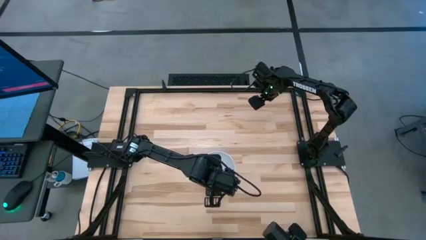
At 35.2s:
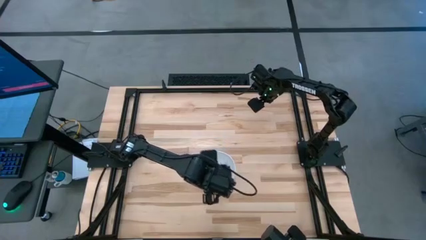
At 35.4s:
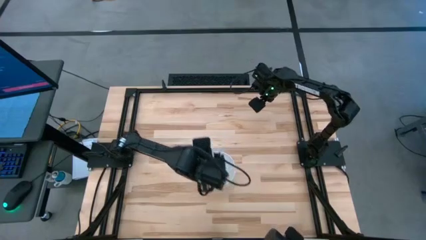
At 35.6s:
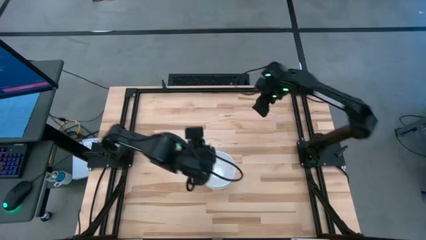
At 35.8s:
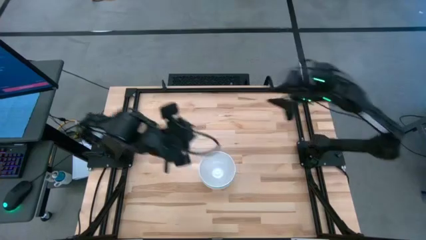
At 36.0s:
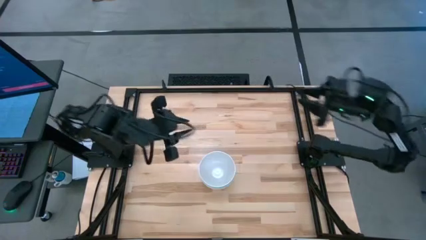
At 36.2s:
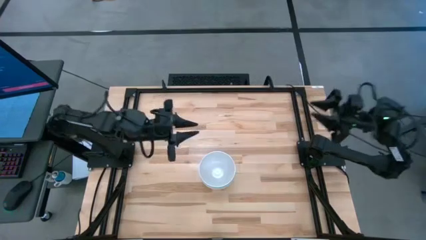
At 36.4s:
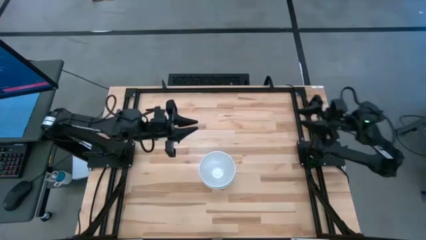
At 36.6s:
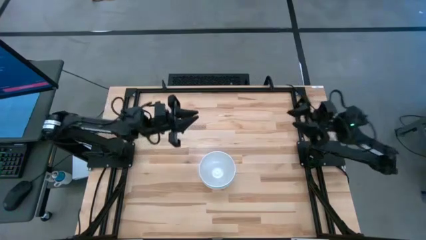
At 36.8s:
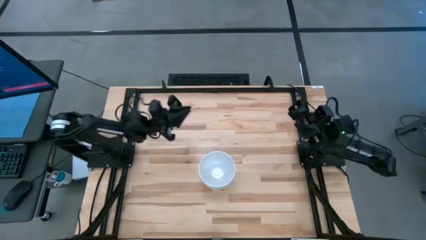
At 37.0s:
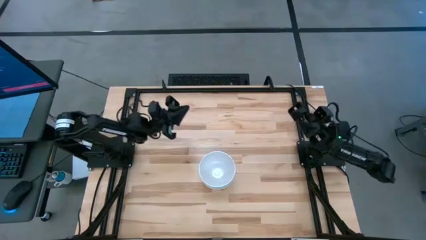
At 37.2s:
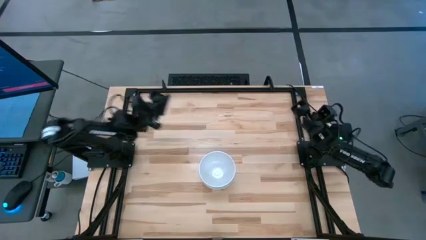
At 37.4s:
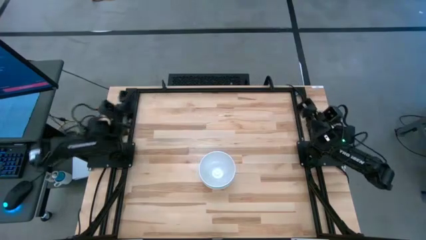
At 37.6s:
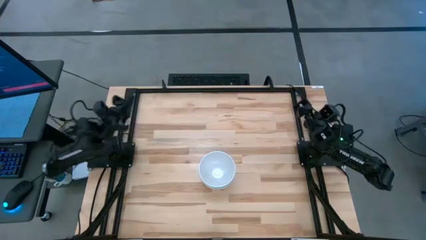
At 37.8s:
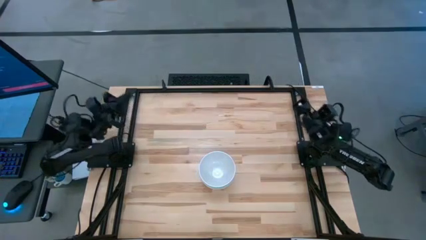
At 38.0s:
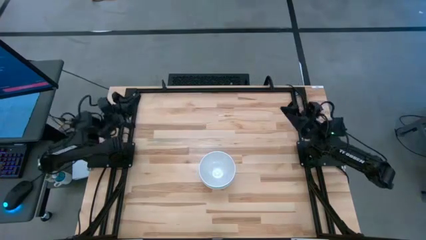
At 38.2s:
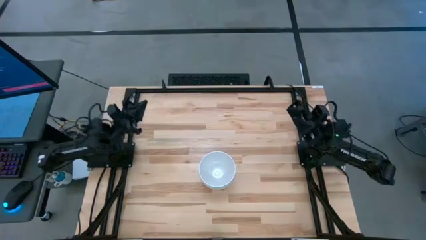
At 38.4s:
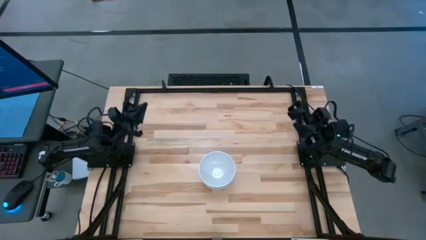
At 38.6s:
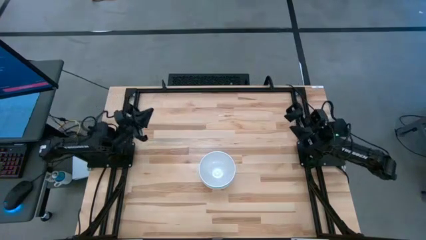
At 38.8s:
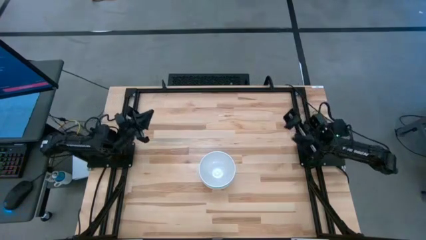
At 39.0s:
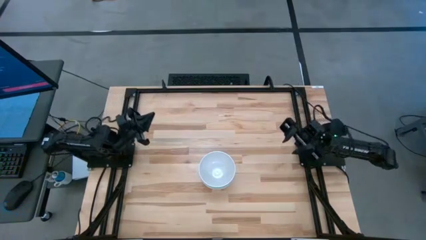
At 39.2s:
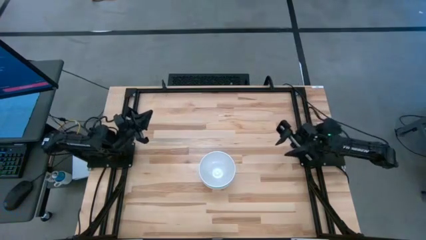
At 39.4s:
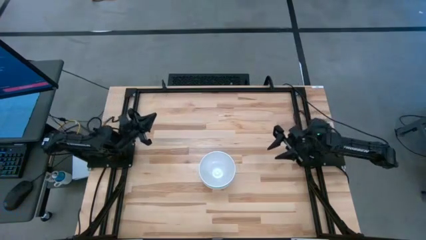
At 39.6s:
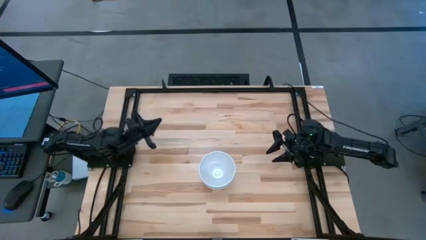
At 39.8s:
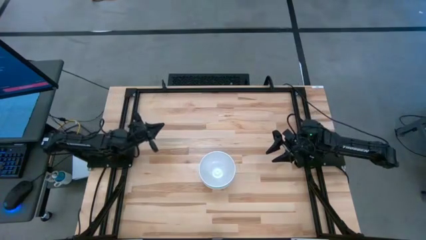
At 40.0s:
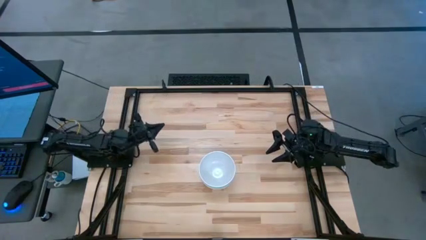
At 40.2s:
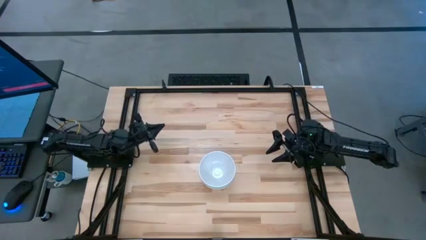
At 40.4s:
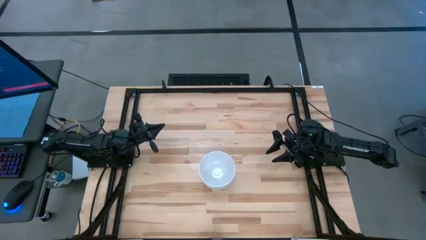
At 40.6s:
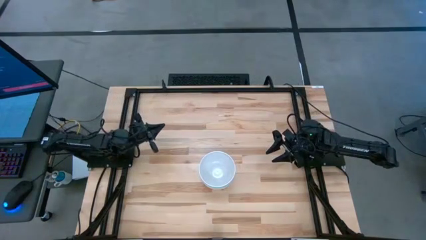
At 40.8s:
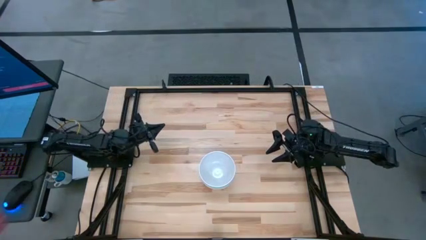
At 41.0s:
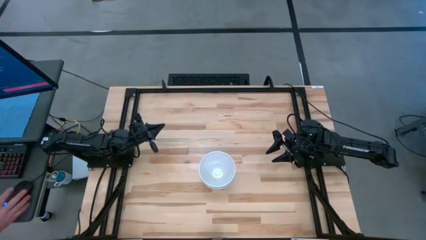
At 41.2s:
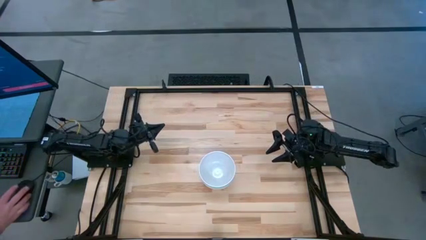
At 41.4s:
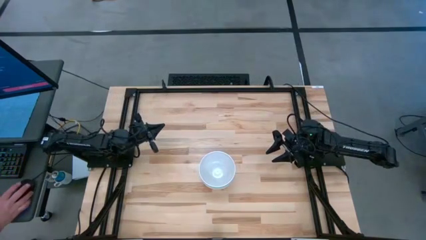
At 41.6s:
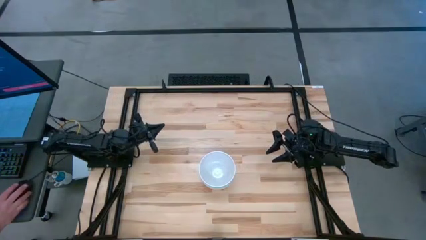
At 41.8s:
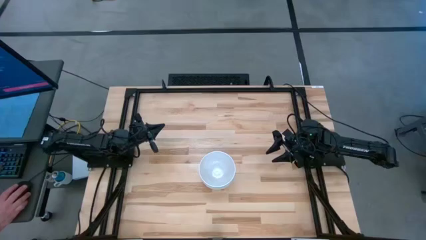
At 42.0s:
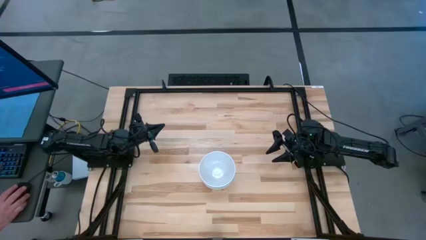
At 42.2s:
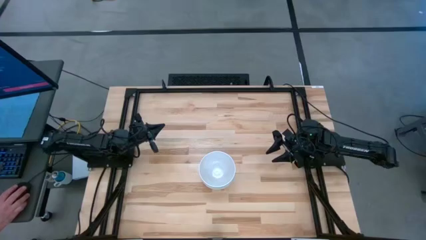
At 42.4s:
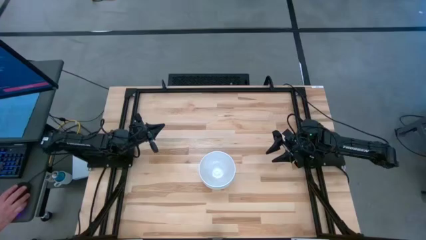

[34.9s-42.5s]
Task: Nest bowls inside each other
Return to Home Position

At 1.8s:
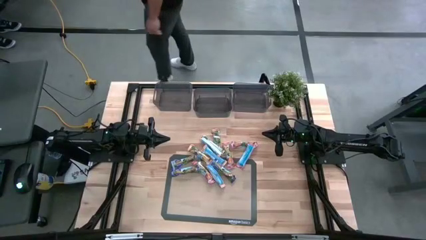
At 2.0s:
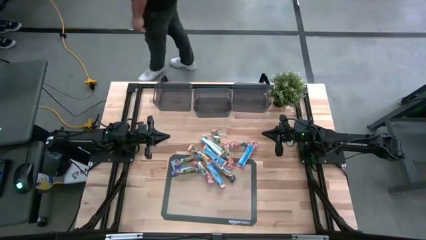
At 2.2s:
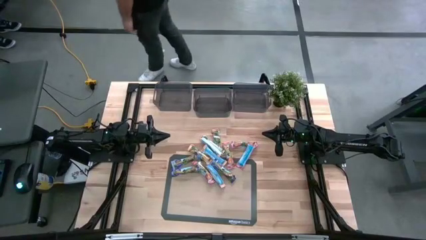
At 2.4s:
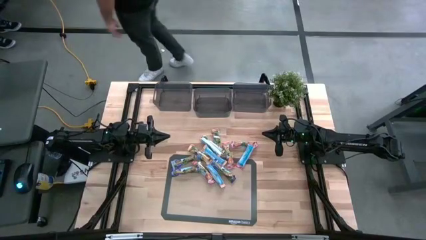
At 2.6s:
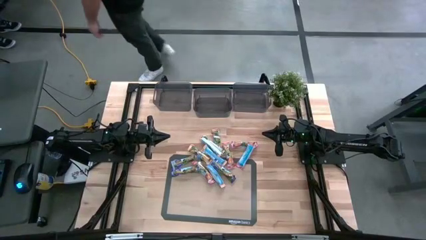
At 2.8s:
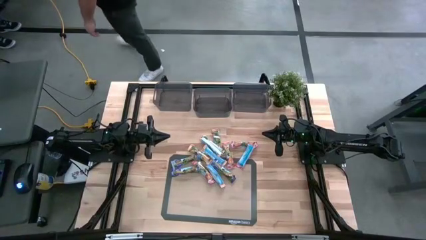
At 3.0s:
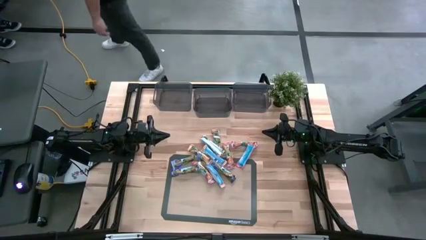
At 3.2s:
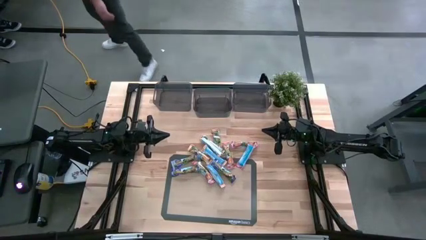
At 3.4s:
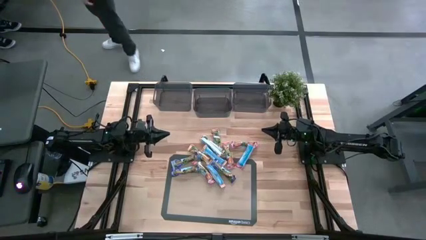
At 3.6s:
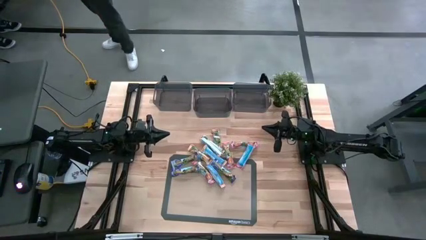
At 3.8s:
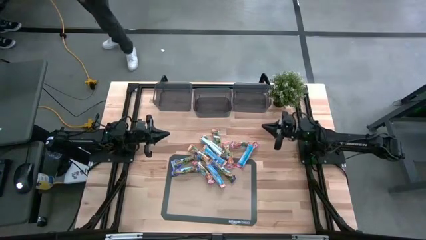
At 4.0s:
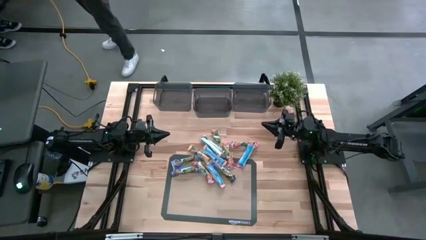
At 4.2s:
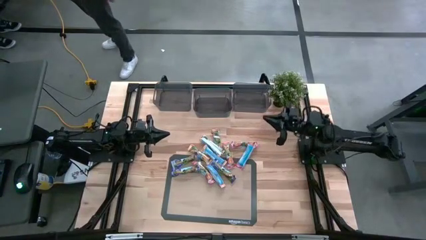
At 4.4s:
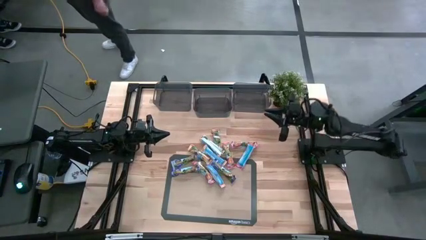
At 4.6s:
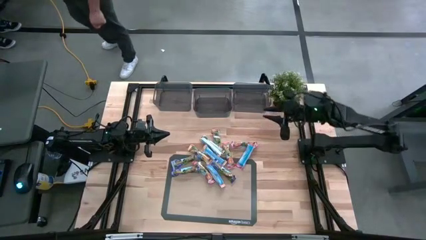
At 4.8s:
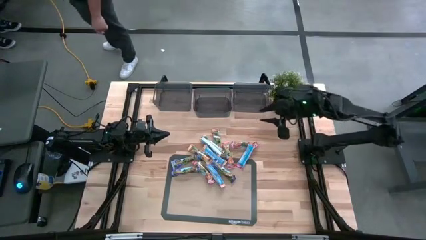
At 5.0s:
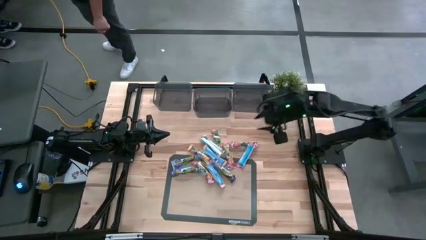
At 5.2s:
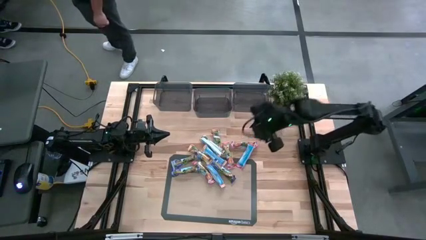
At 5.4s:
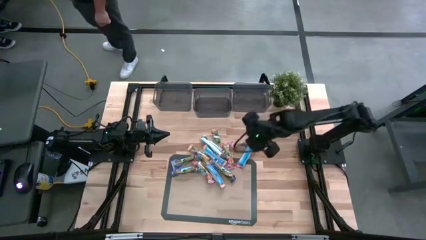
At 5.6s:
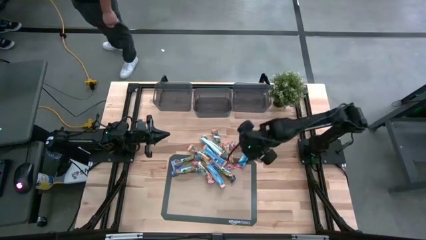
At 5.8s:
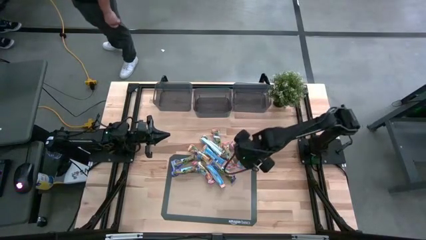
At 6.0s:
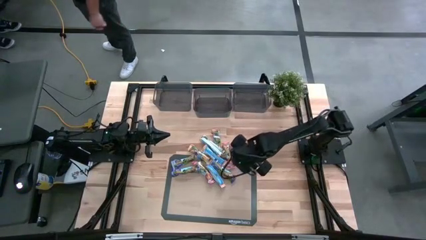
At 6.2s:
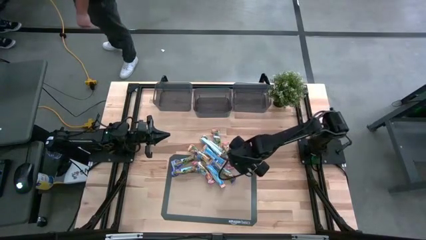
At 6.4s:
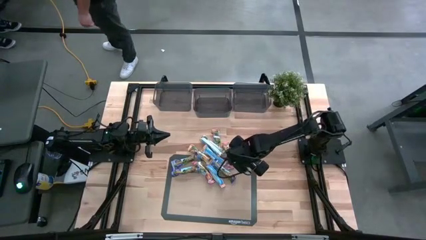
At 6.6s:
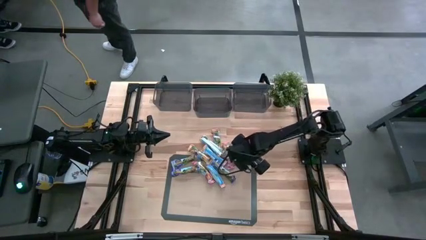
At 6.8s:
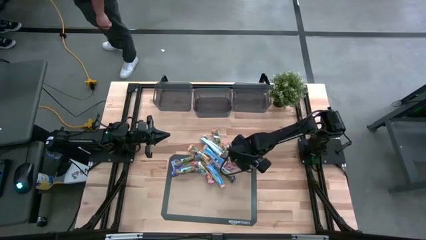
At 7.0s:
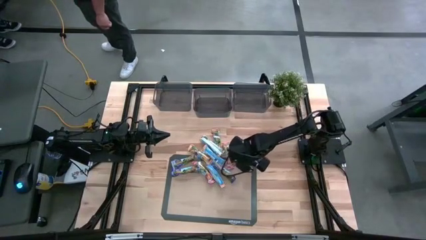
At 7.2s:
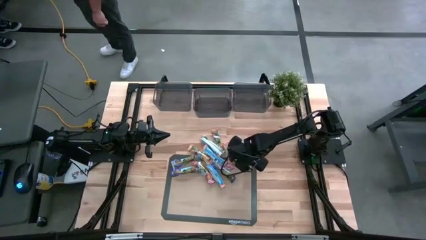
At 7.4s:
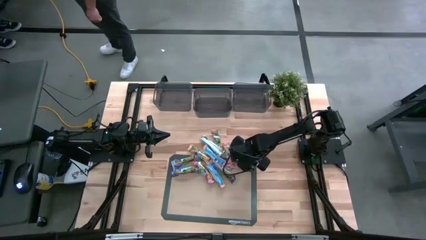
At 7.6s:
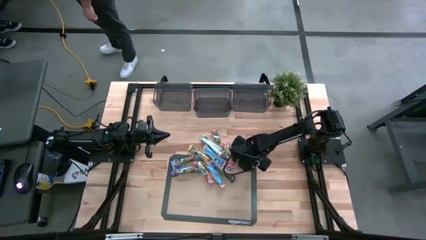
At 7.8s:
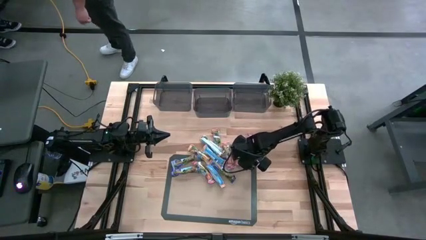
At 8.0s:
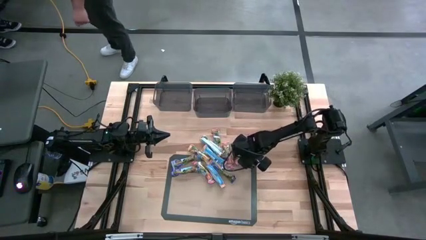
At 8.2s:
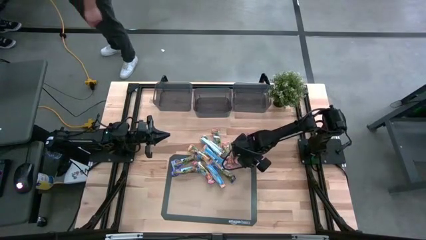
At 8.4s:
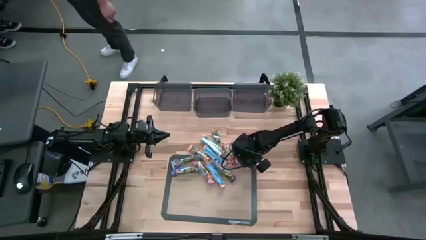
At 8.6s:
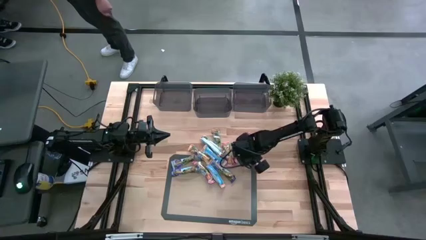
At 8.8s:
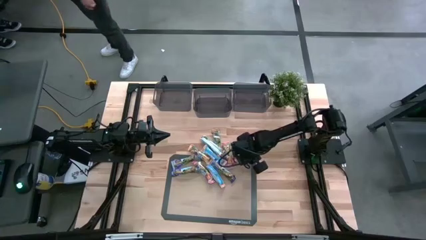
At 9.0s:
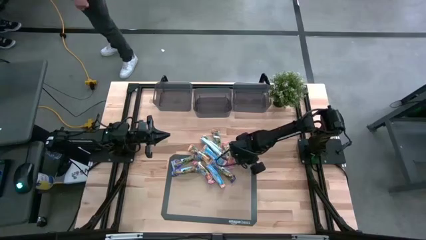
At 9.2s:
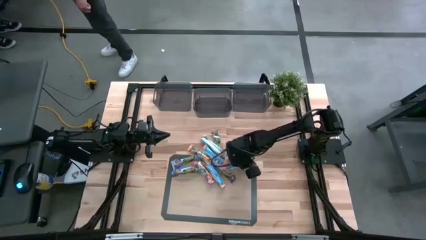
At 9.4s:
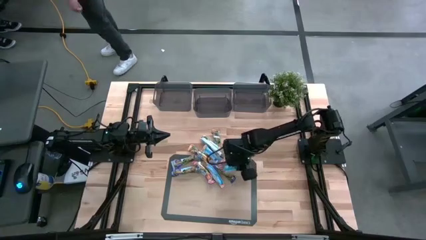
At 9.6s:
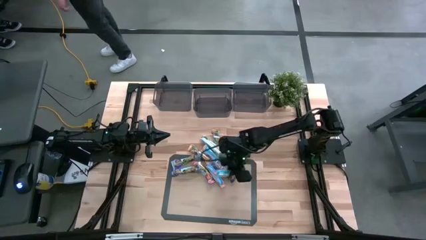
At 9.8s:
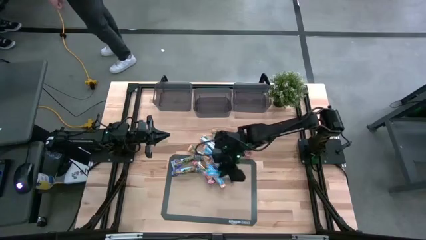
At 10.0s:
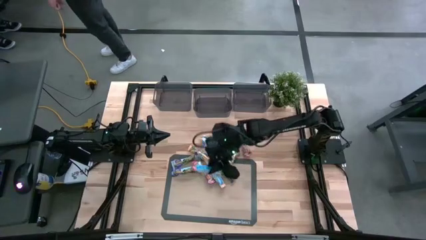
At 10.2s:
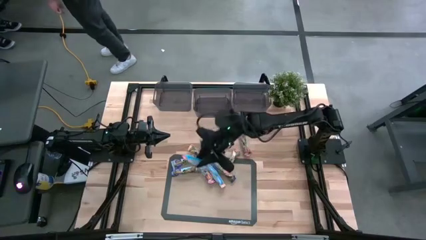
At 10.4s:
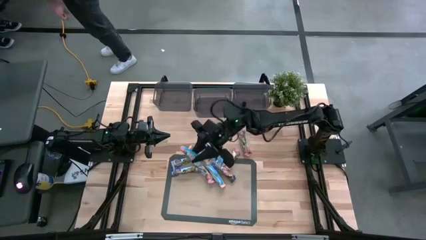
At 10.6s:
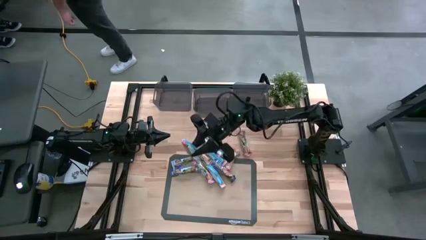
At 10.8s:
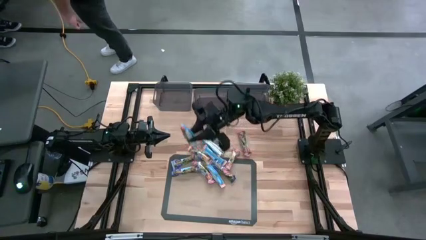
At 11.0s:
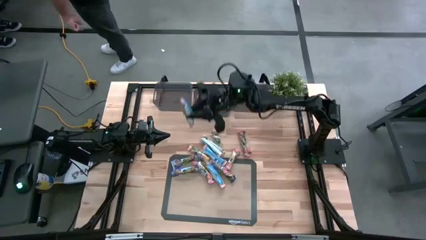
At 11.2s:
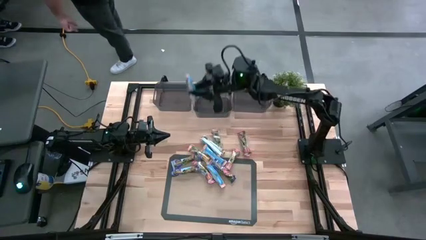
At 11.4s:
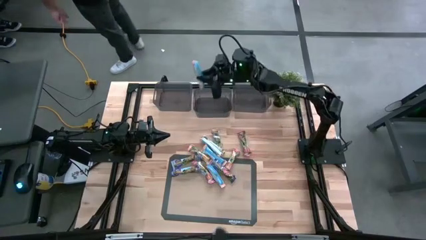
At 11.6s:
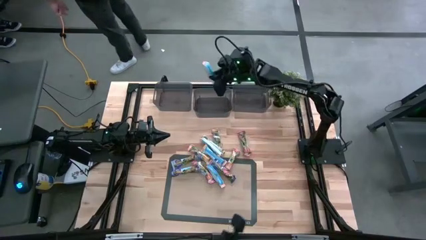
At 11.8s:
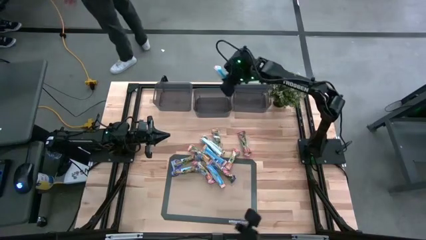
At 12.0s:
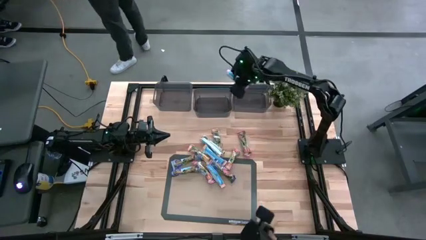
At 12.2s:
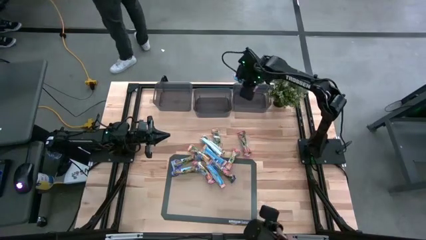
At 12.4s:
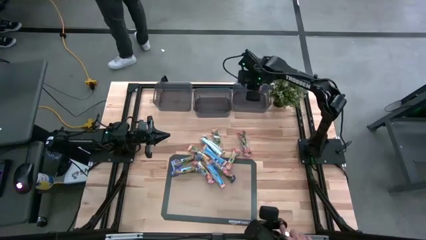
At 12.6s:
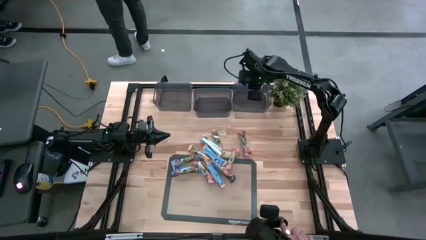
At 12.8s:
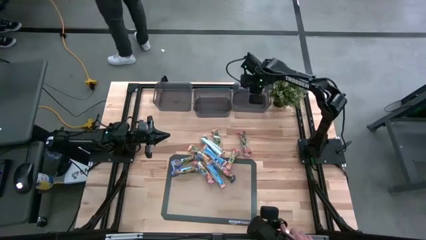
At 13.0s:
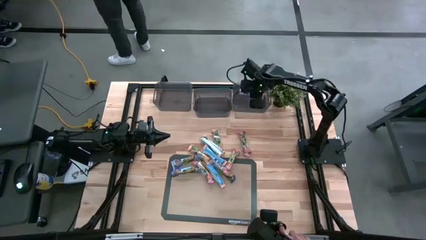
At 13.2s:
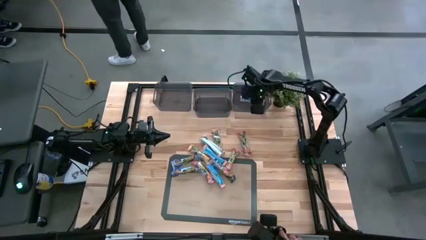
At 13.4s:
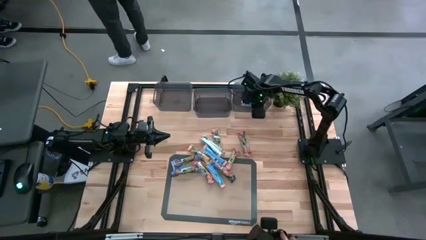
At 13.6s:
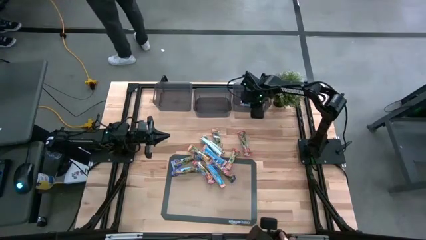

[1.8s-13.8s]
Task: Pick and place Granola Bars by type
Put the red granola bar into the right black bin
